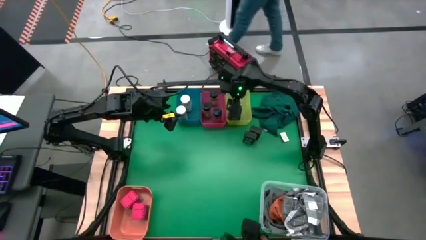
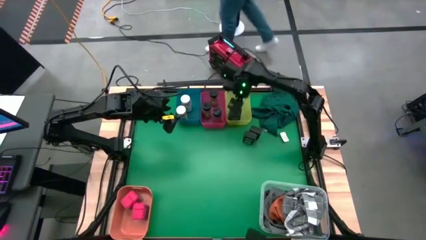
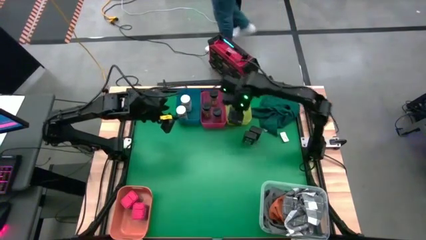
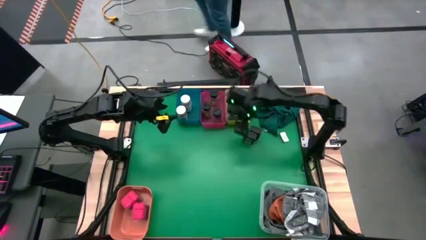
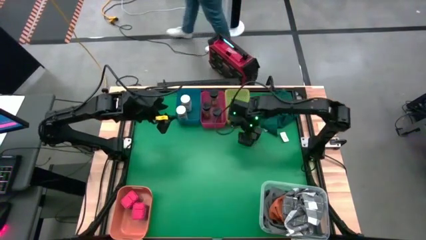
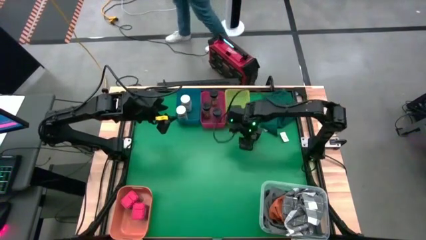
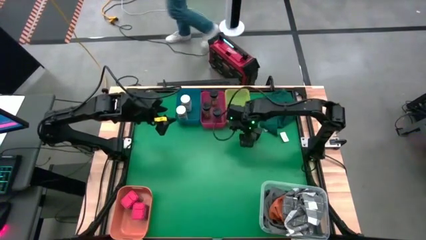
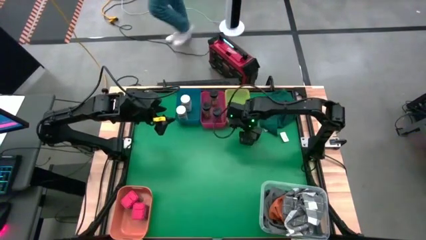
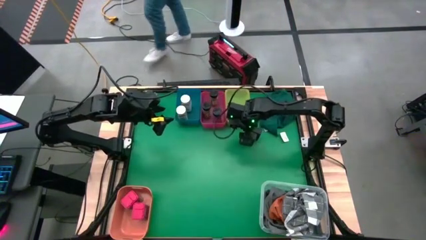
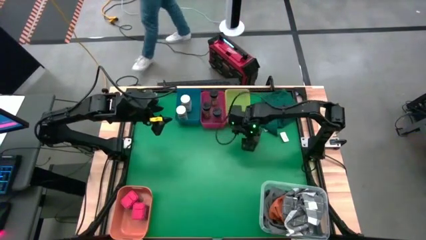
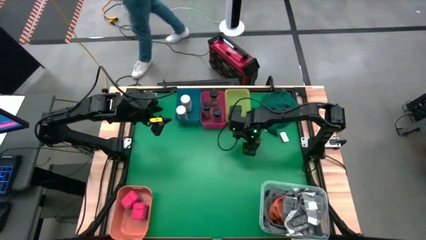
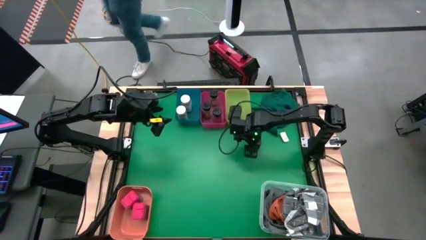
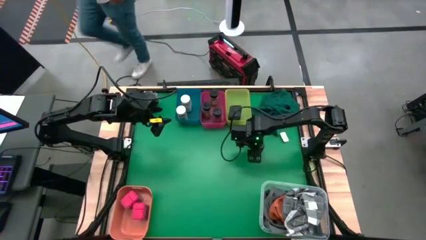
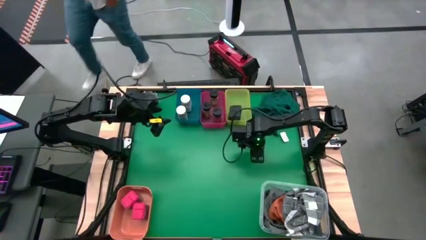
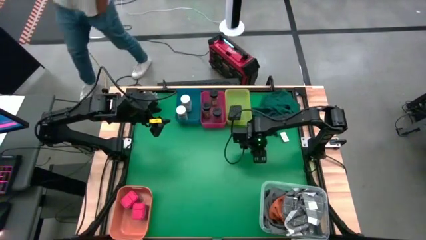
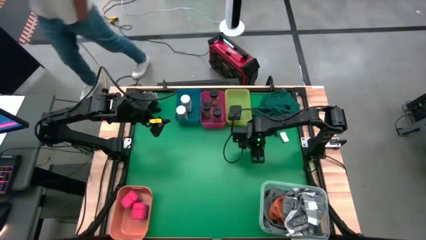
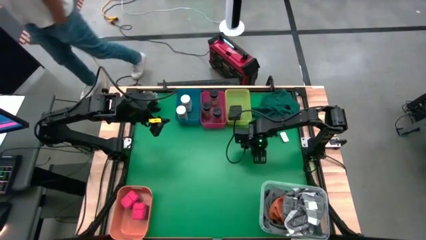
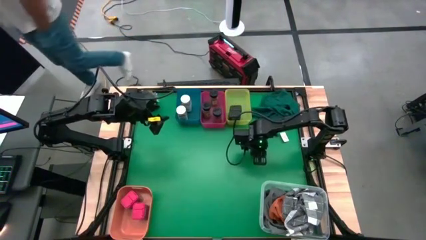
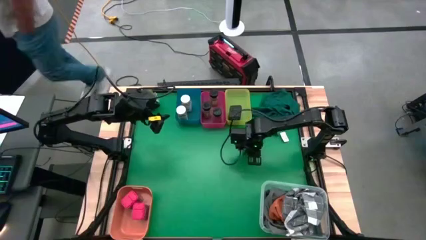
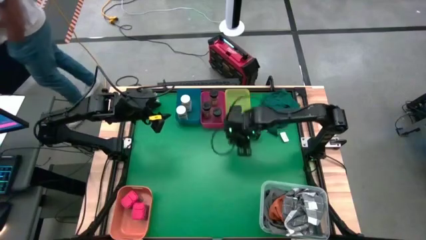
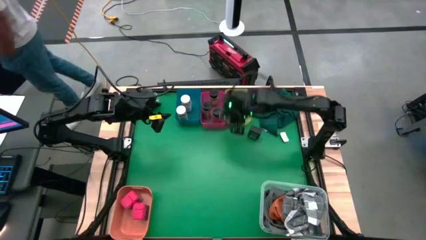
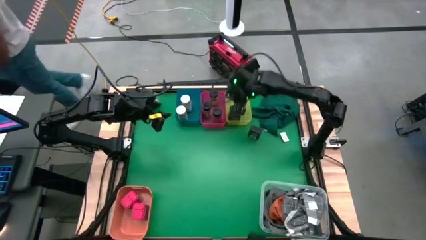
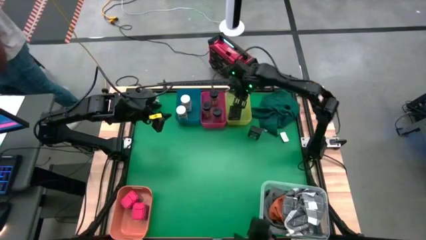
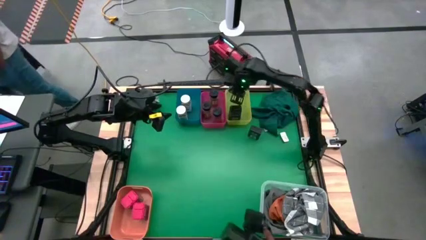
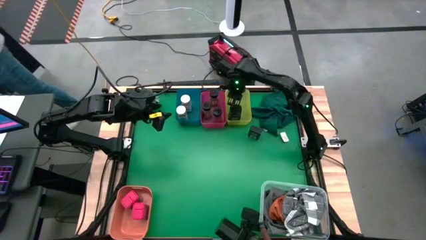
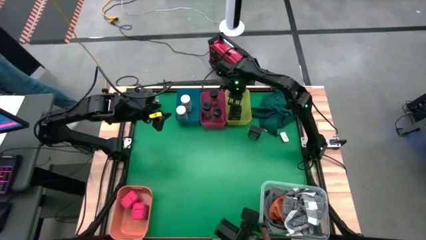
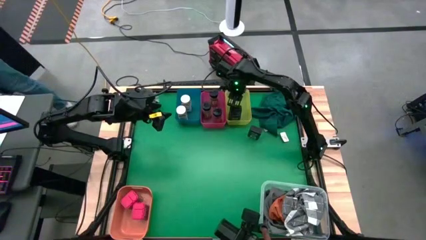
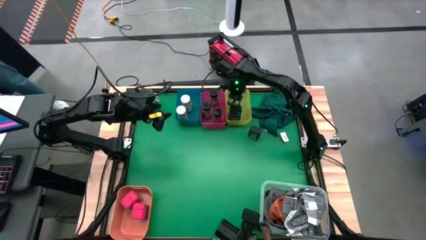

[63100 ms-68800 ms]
Task: Sort spices by type
Put the bottom black seasoning can into the yellow bin

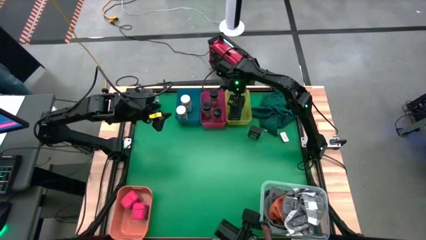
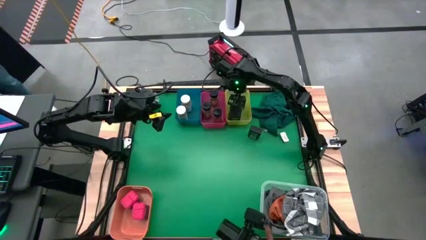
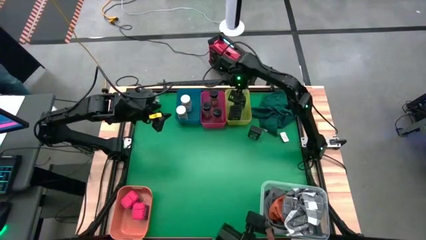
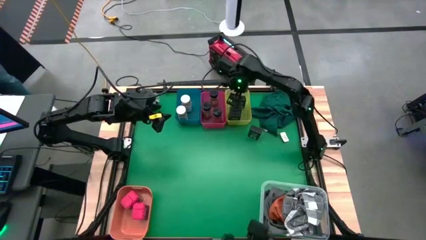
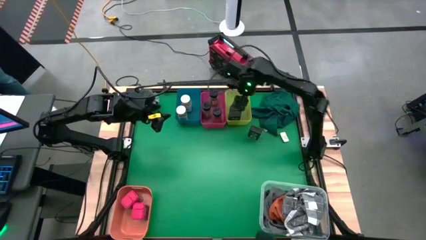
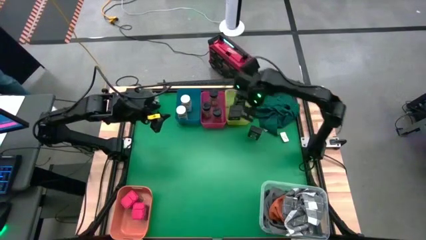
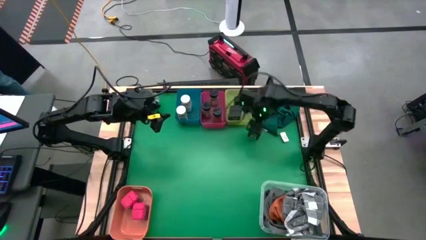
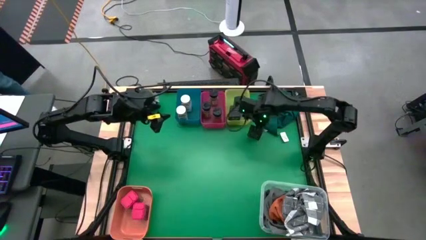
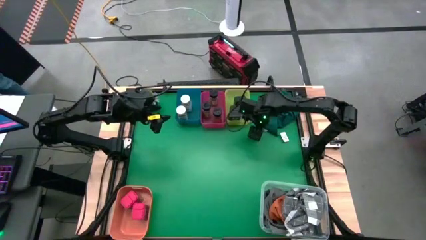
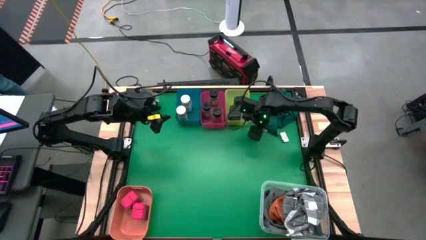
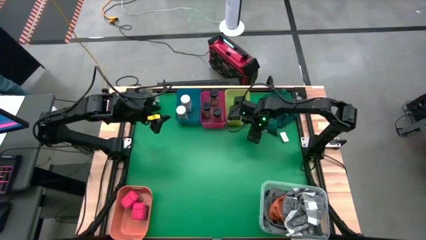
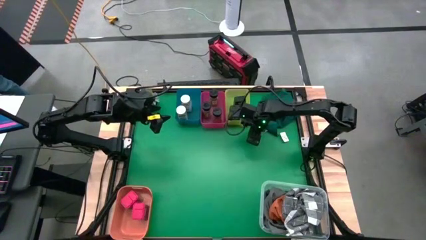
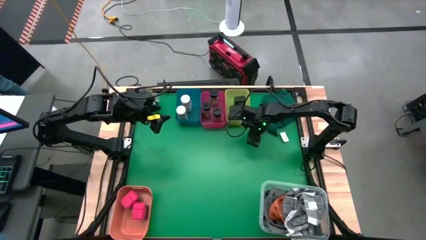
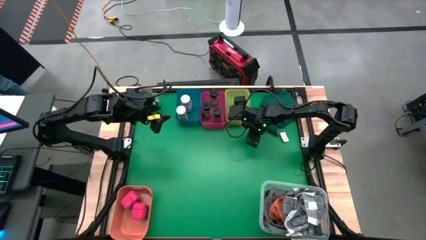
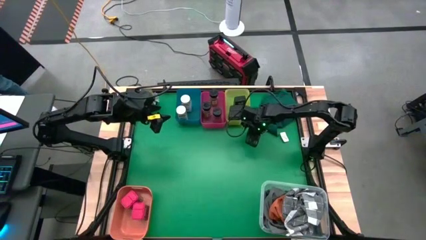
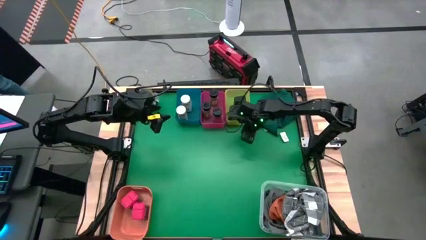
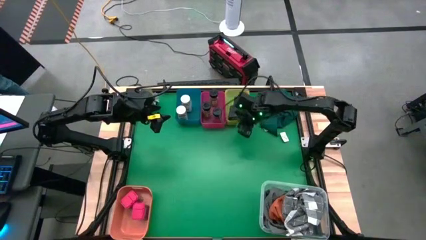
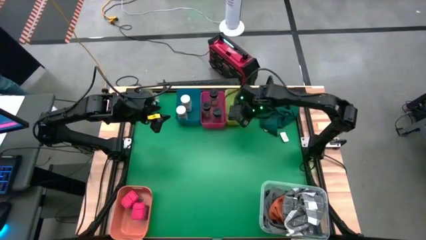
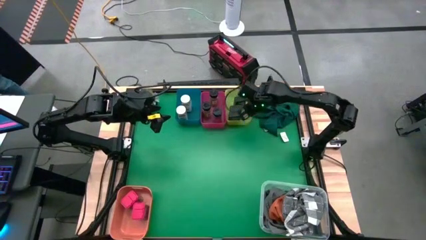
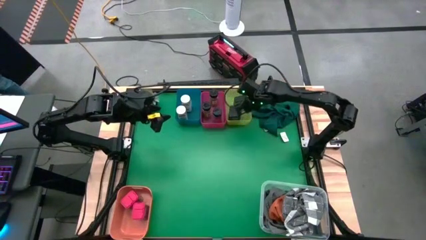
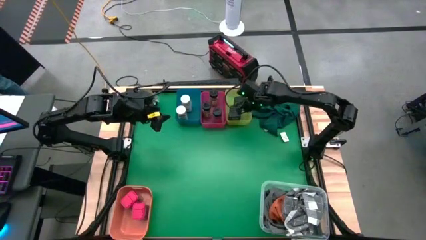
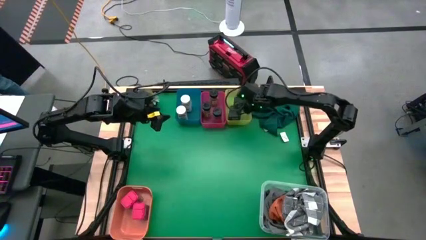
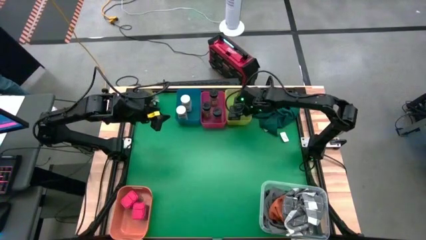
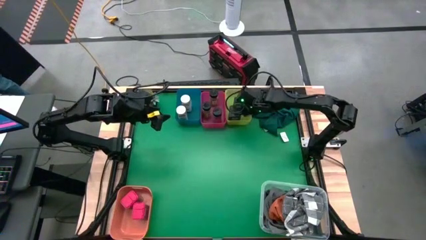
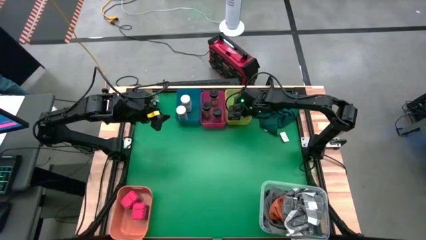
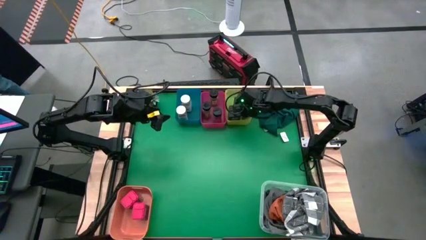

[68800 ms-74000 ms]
Put the black seasoning can into the yellow bin

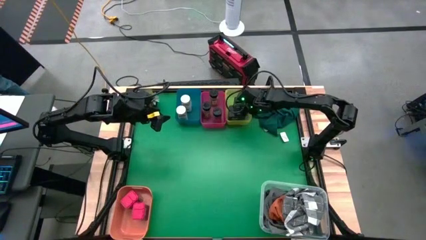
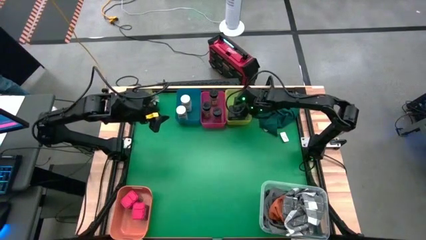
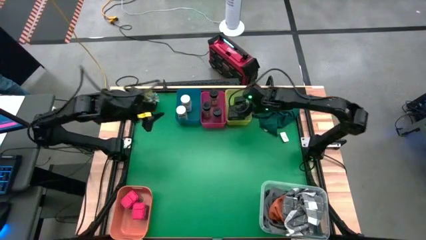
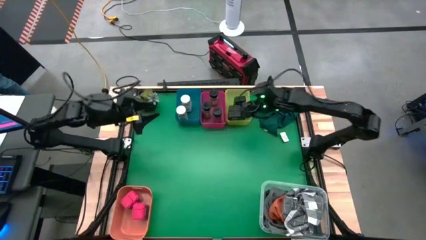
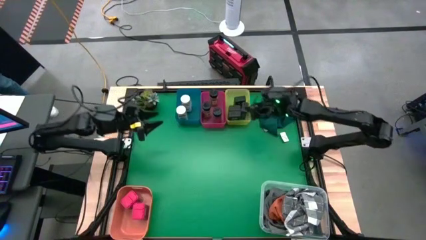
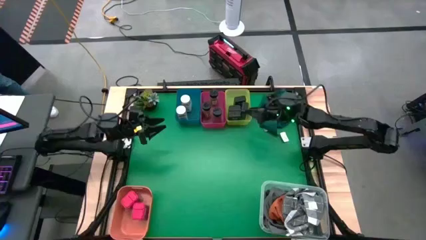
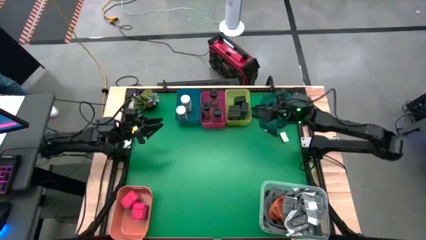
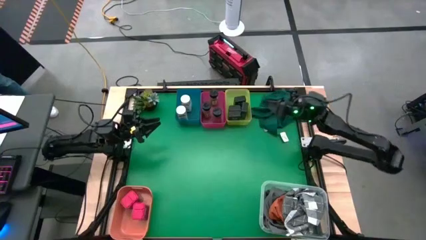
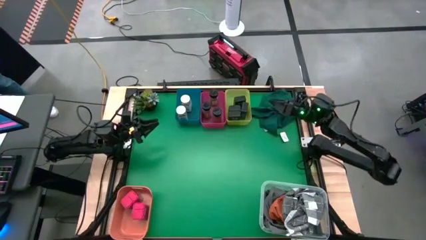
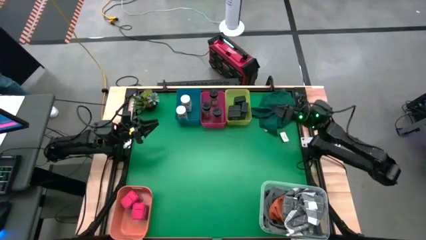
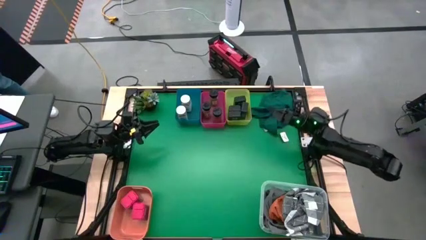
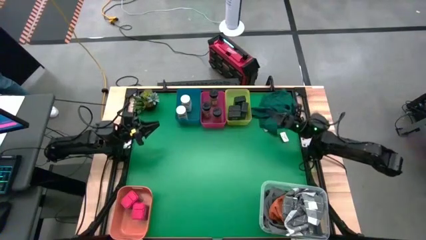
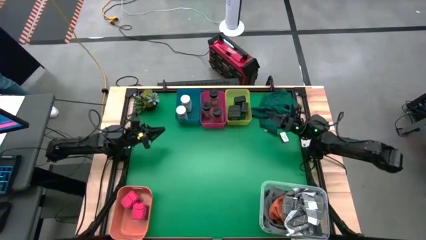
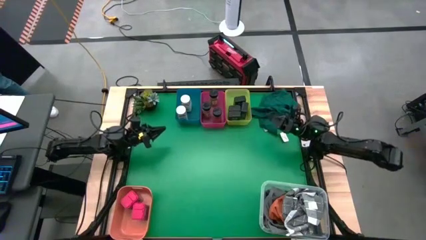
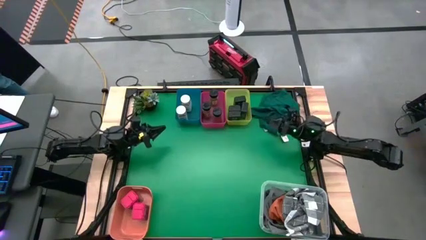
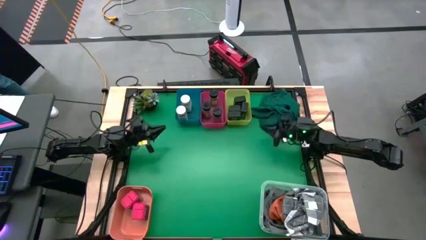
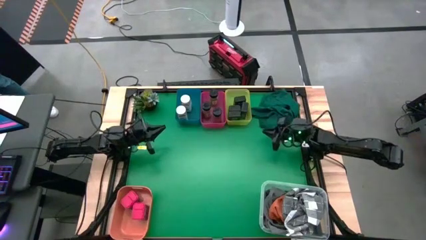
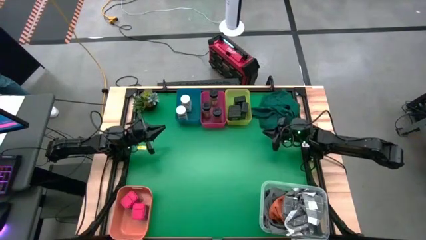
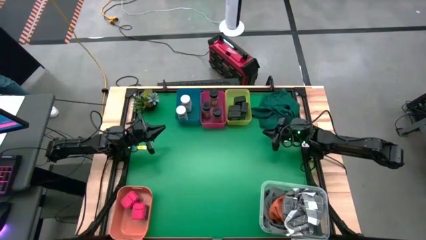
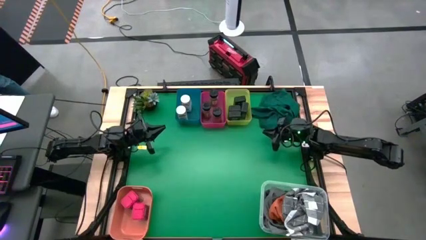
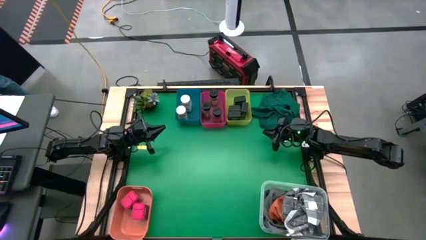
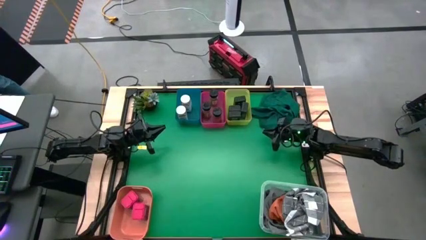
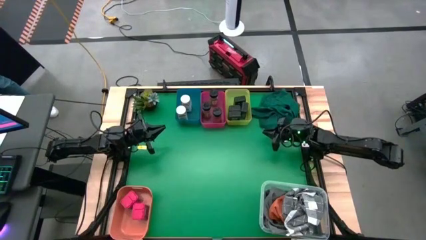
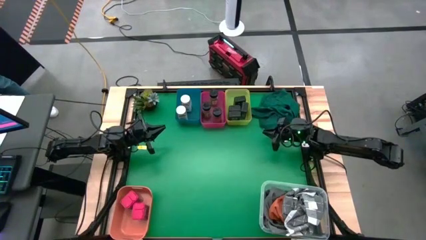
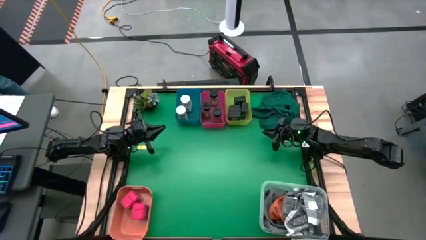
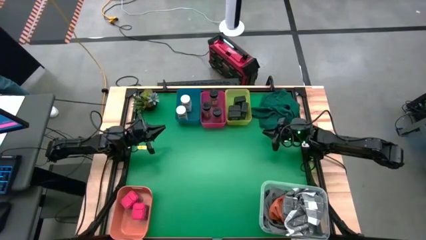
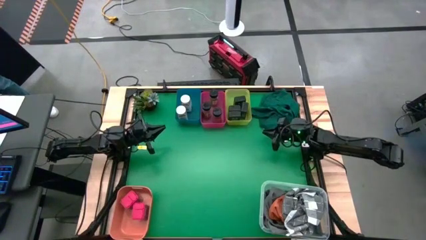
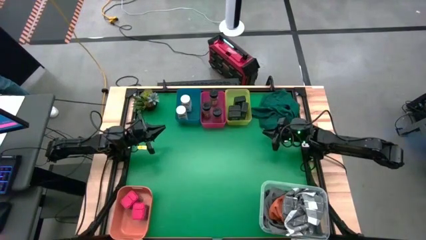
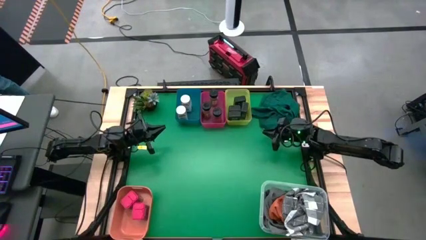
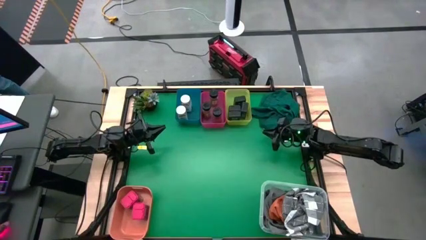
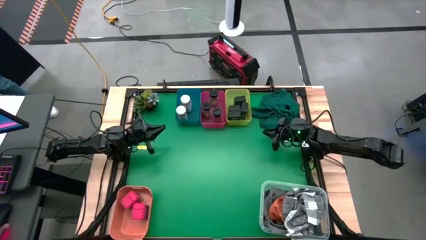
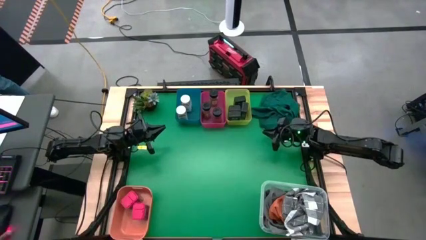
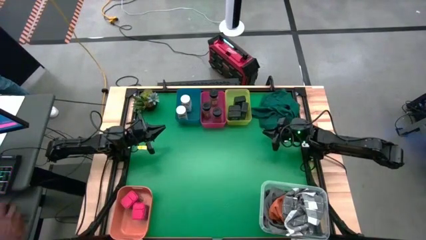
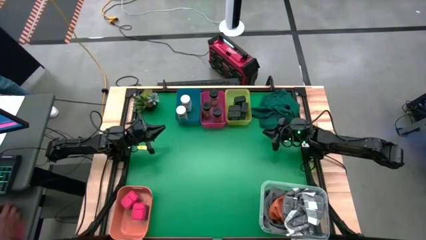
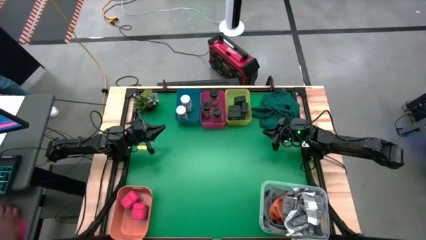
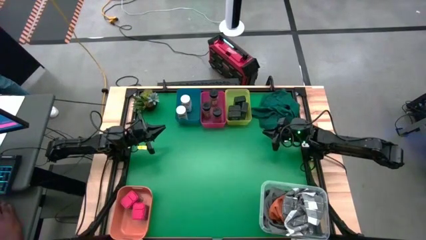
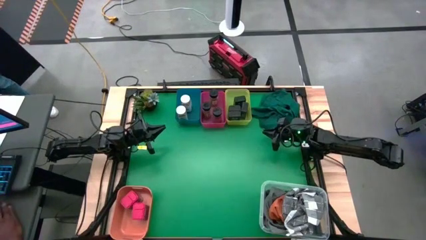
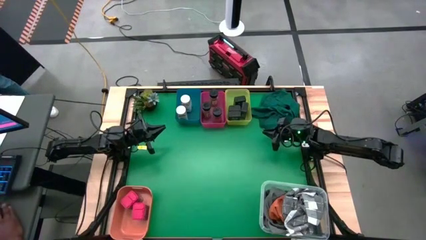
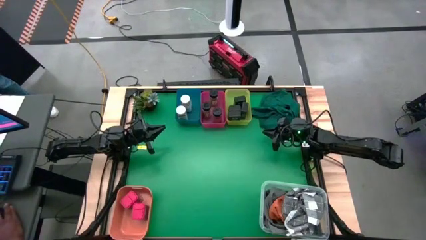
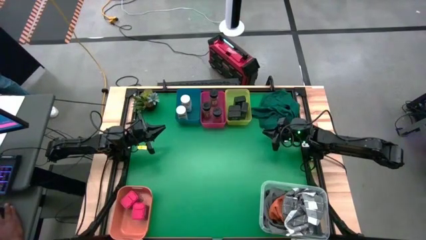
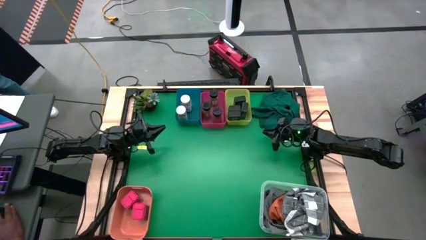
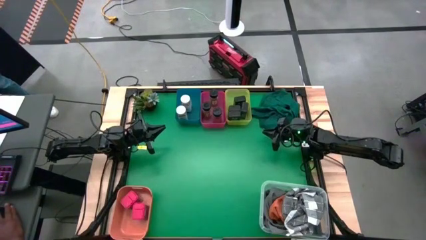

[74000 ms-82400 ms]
Return to Home Position
